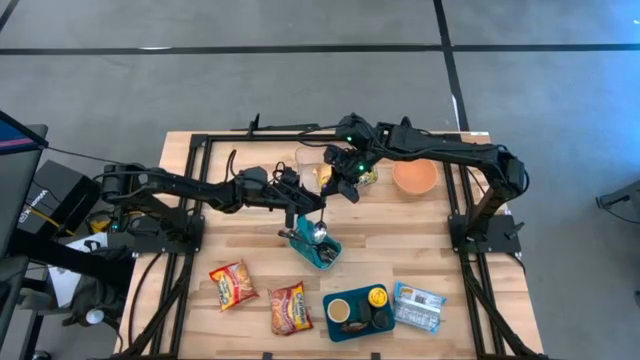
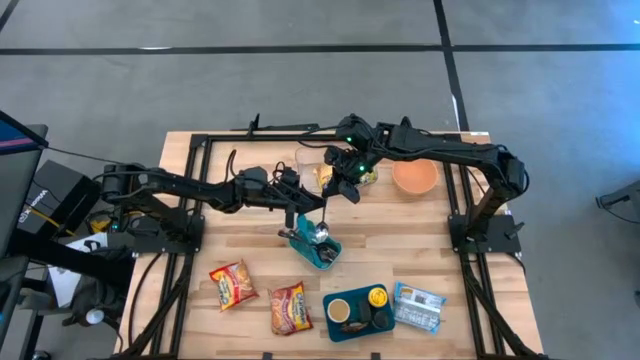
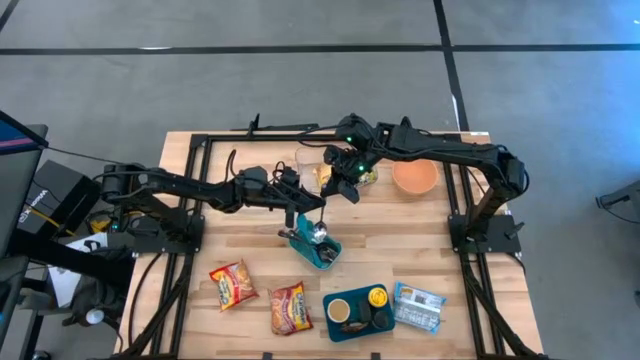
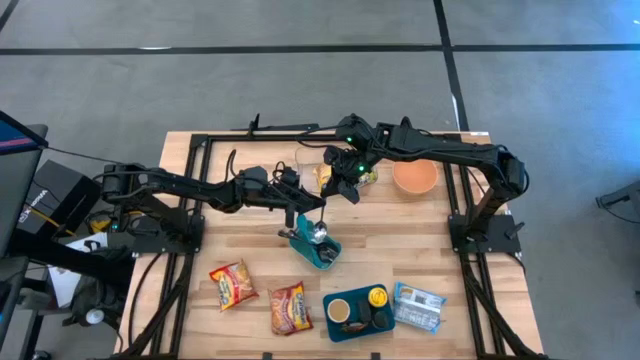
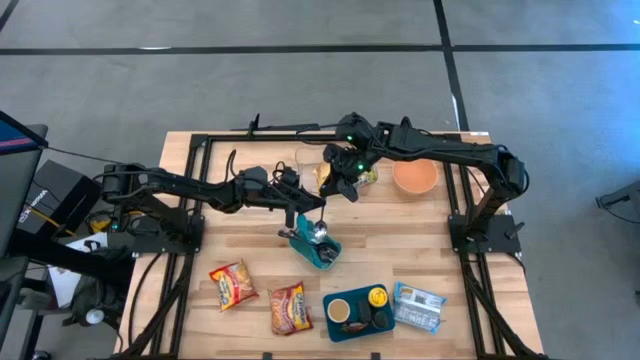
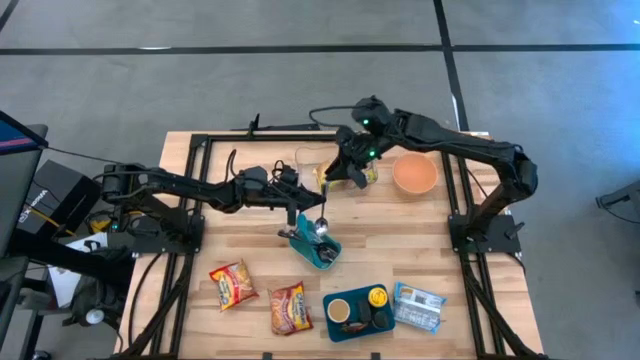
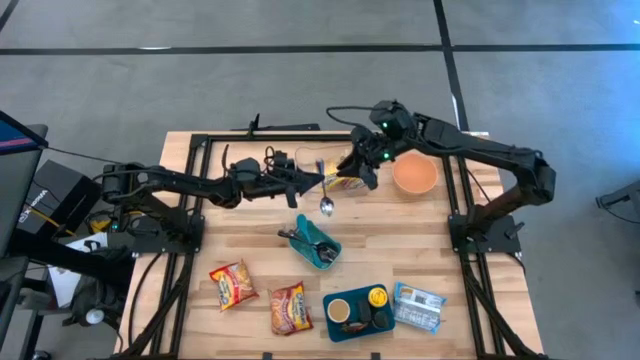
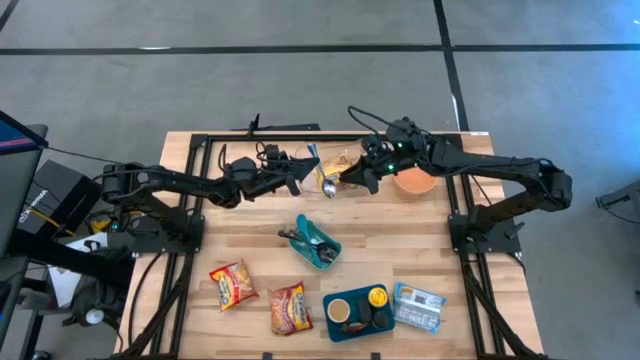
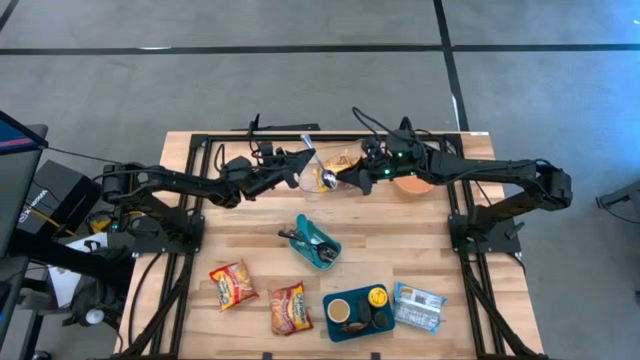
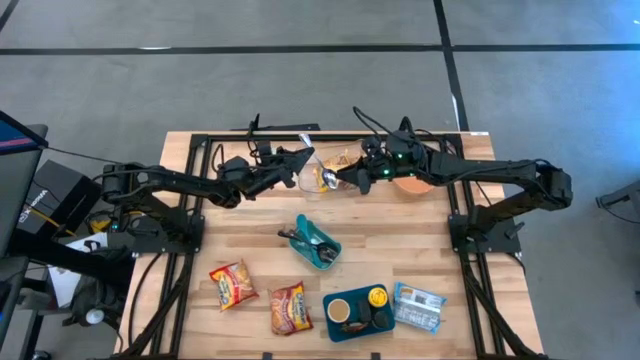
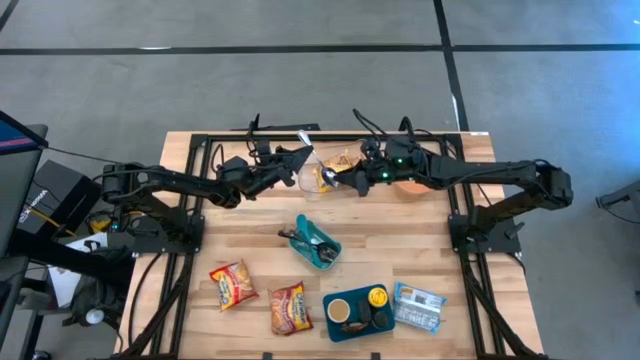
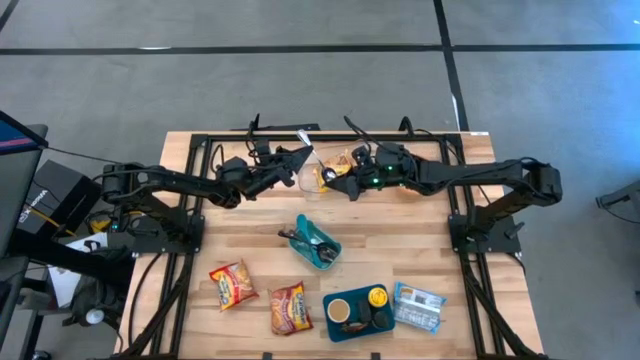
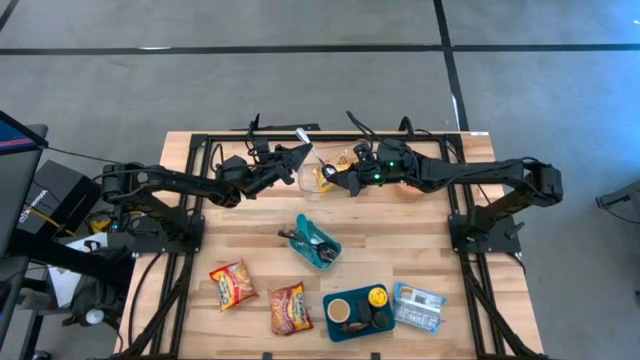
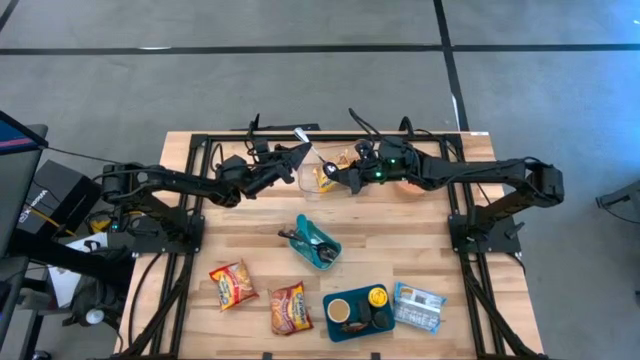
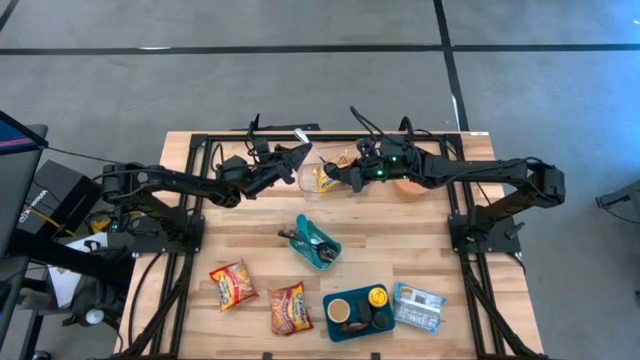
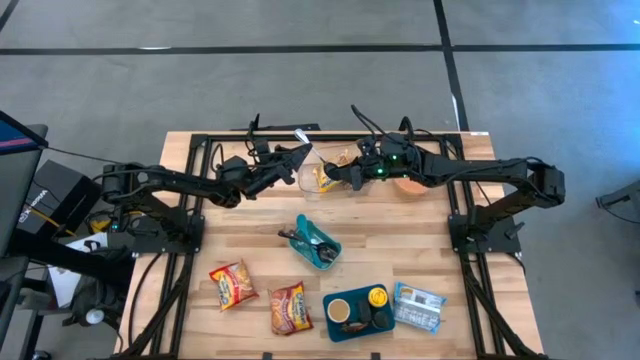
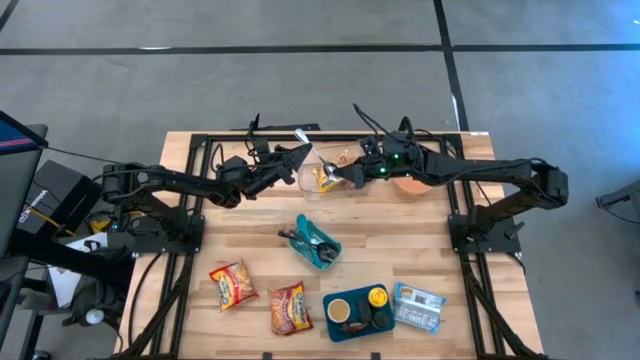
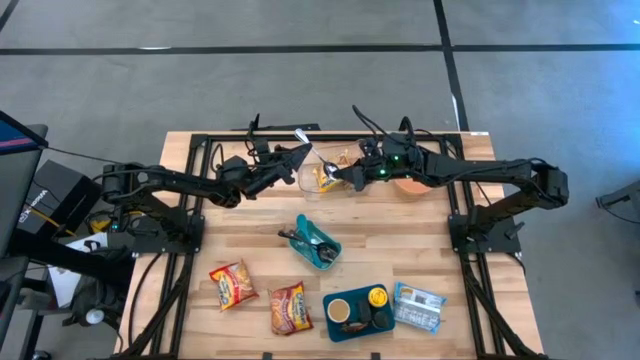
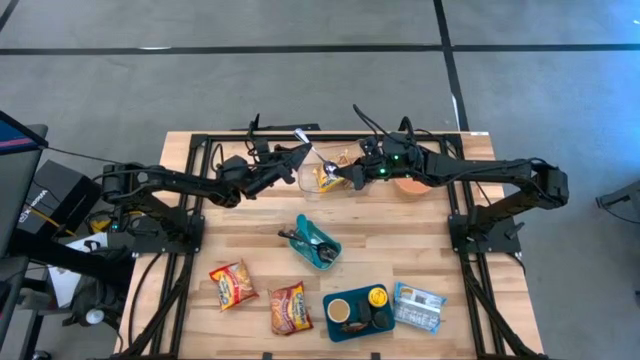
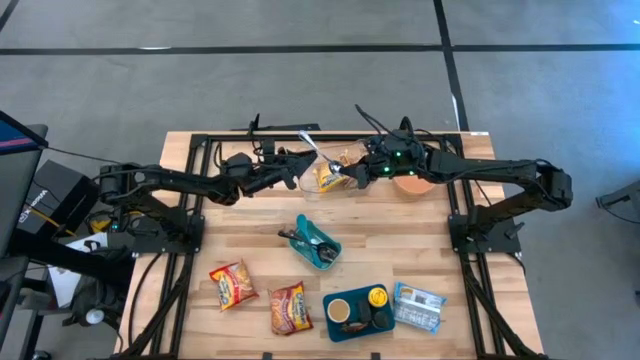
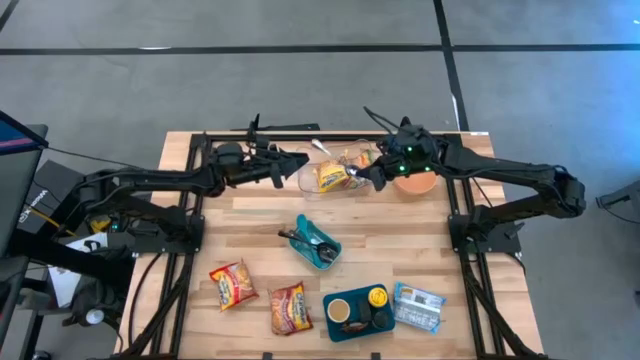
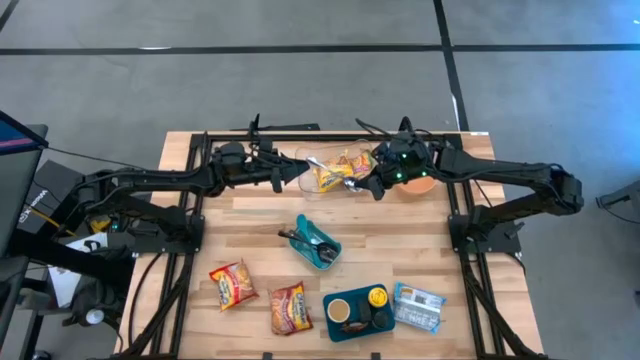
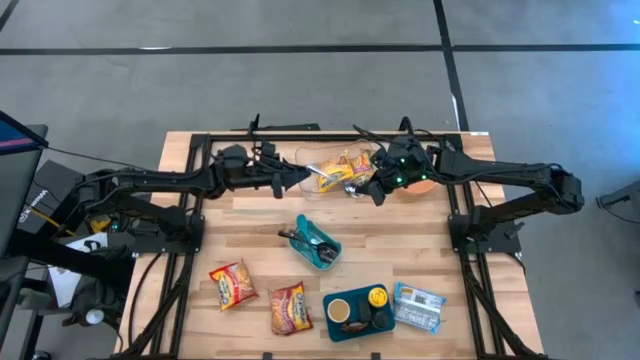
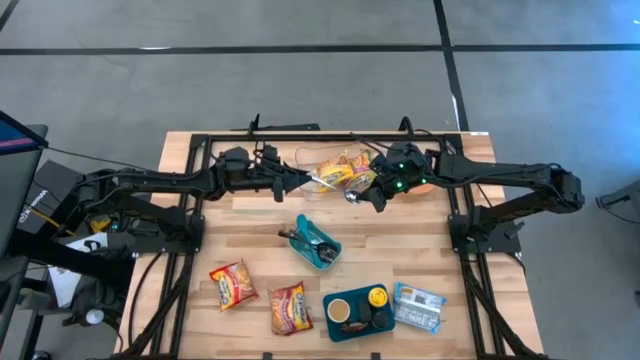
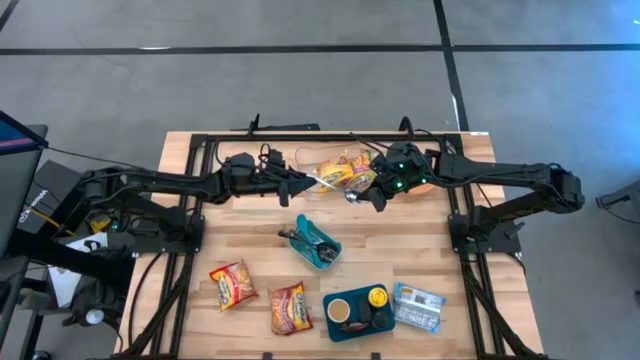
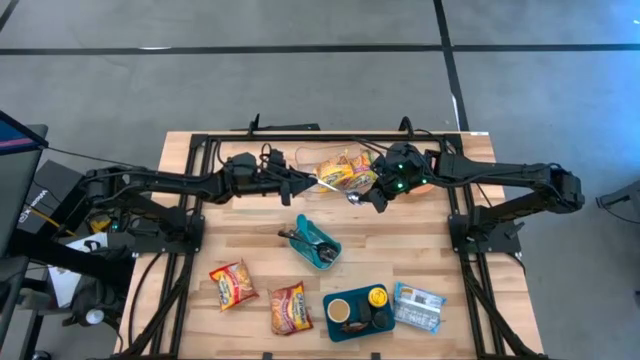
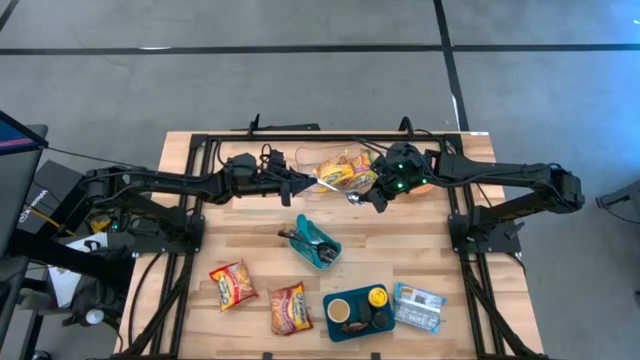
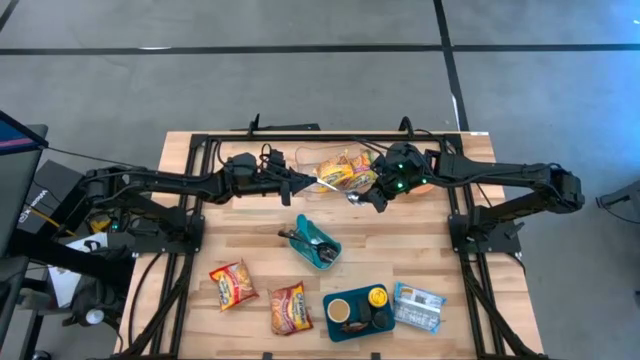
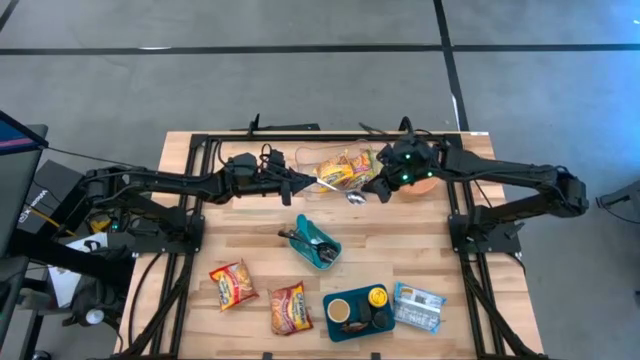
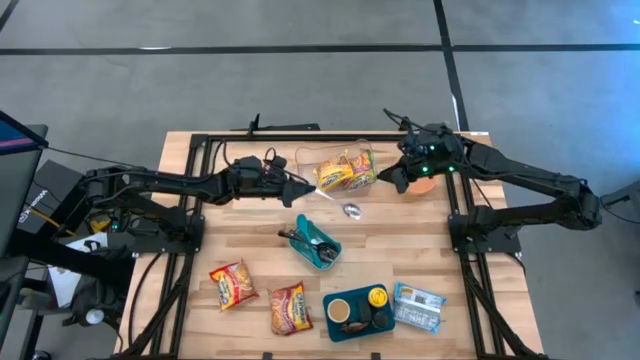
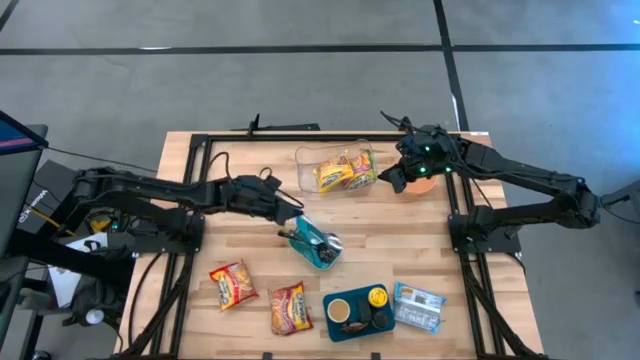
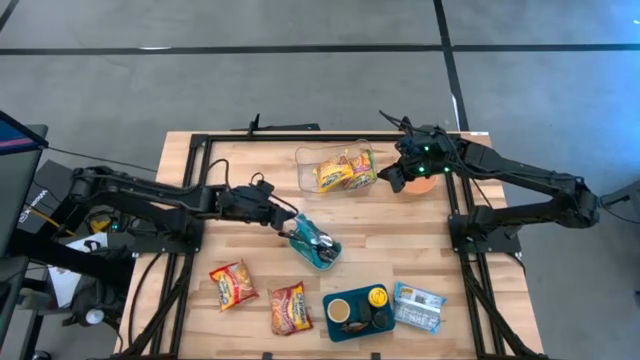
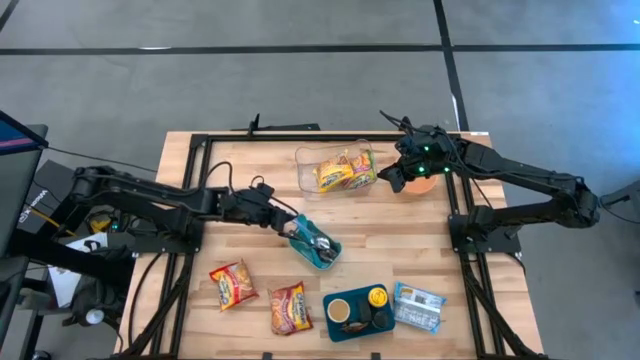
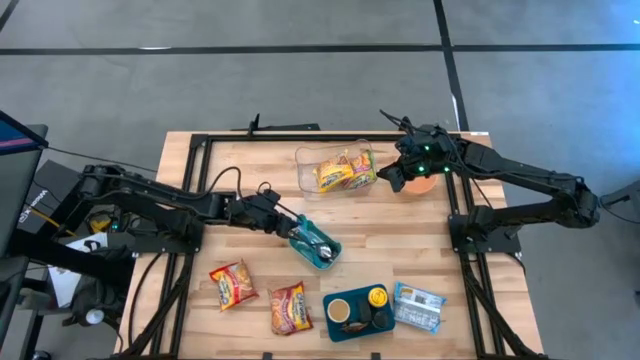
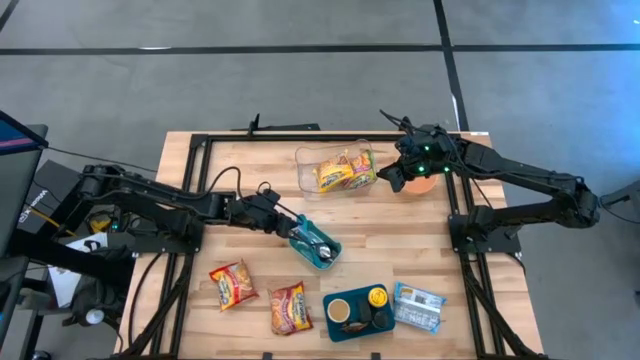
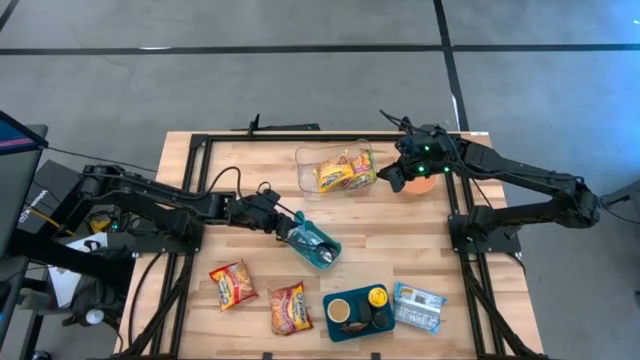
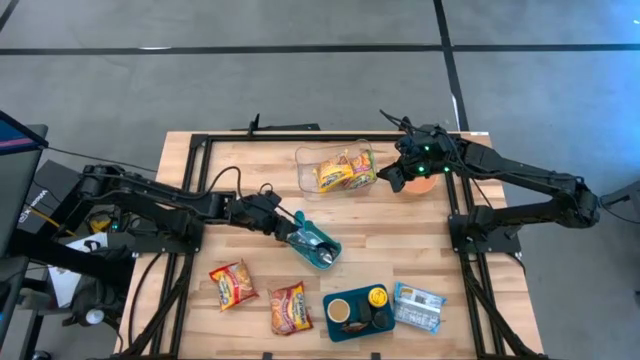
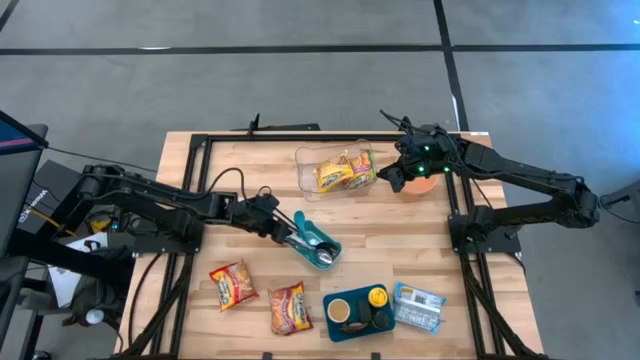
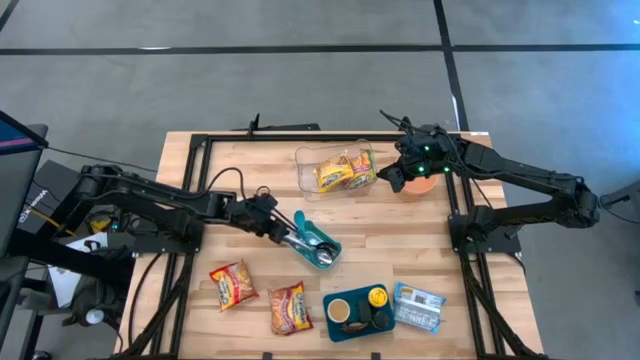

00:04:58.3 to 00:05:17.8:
Task: Pick & Place Food Item
Put the silver spoon into the green bin

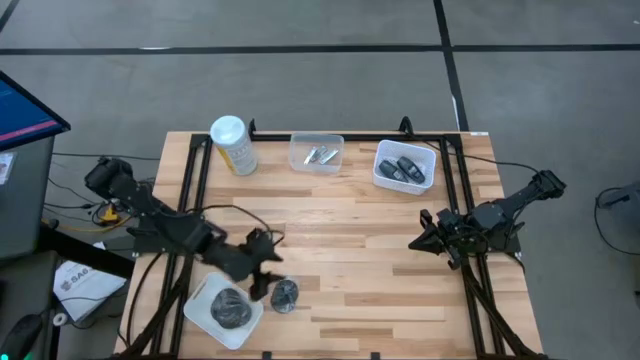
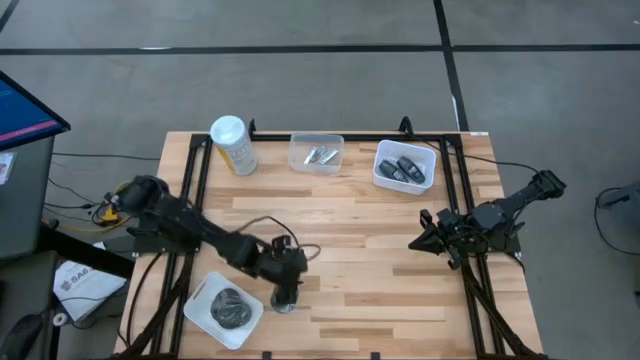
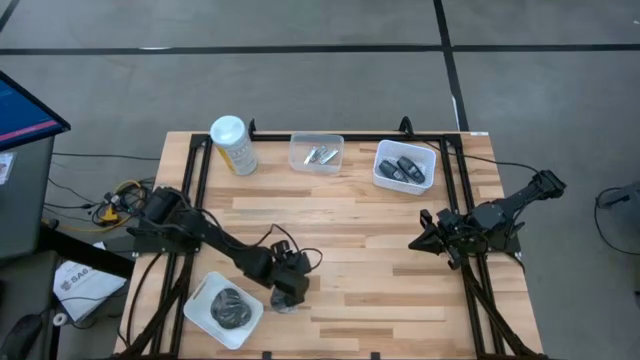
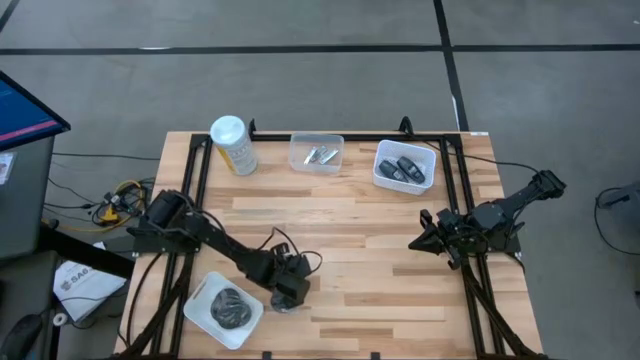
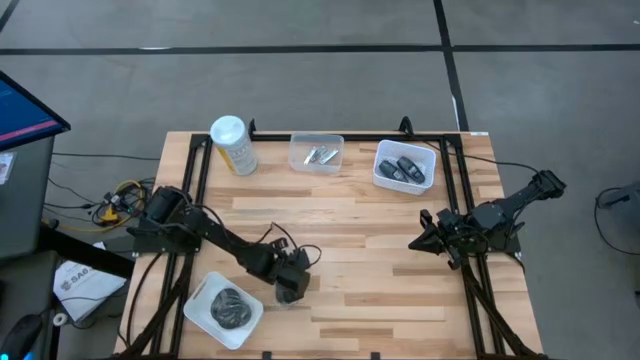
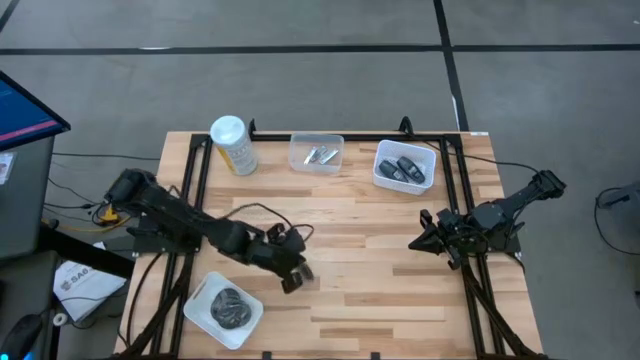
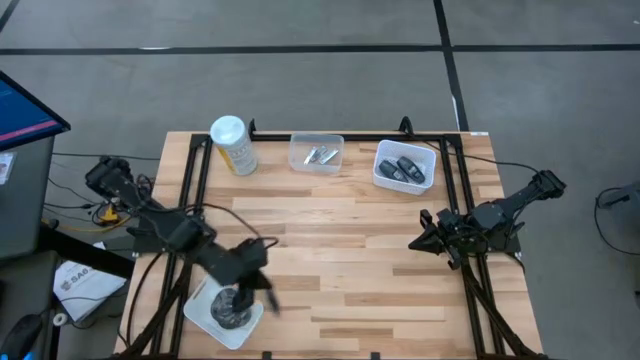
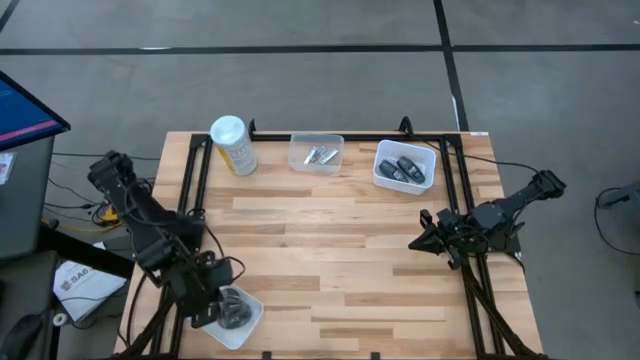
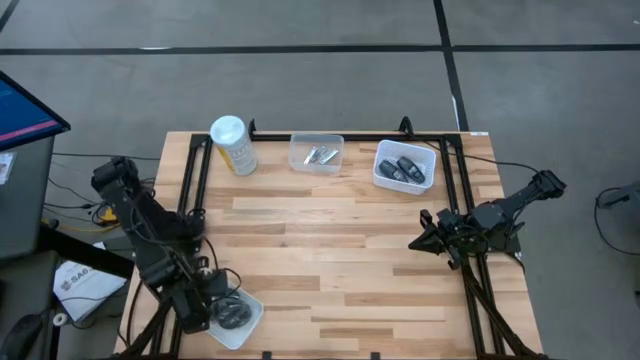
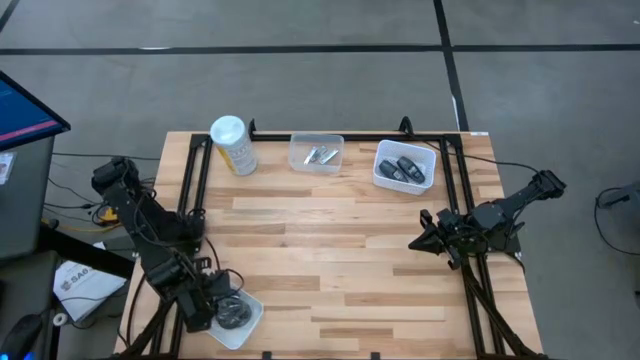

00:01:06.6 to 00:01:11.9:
Task: Pick & Place Travel size toiletries
Put the black hairbrush into the white bin
